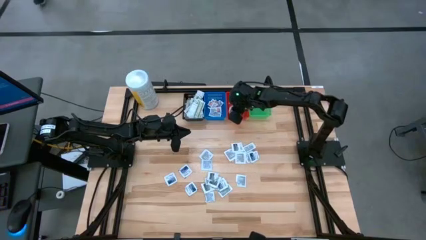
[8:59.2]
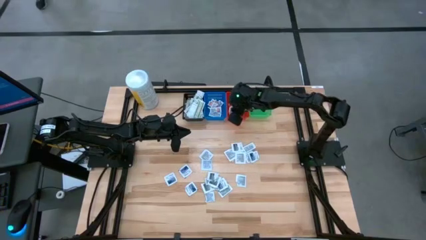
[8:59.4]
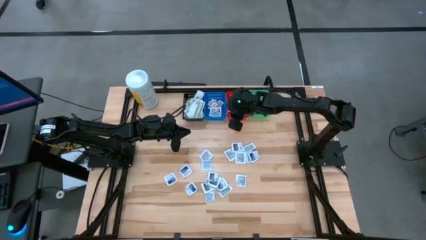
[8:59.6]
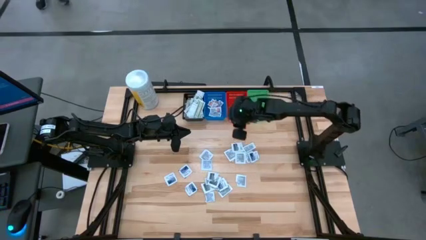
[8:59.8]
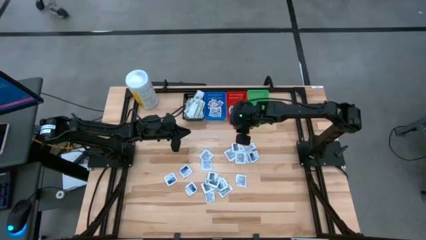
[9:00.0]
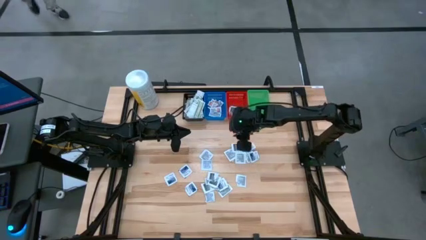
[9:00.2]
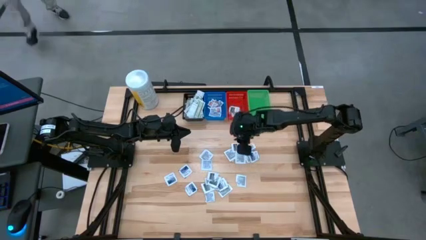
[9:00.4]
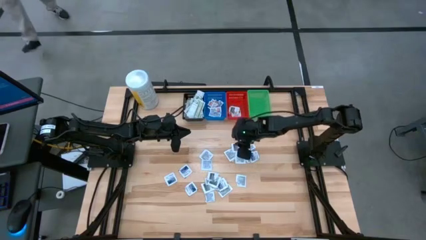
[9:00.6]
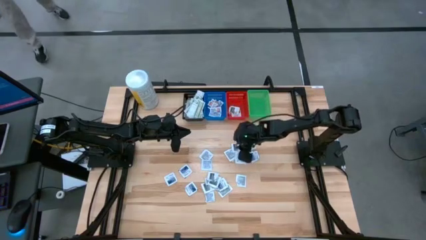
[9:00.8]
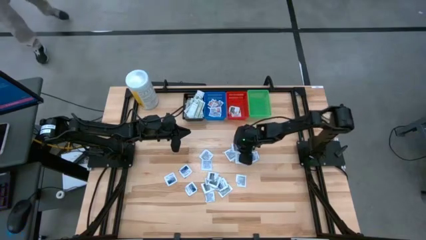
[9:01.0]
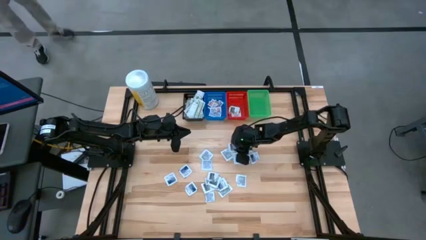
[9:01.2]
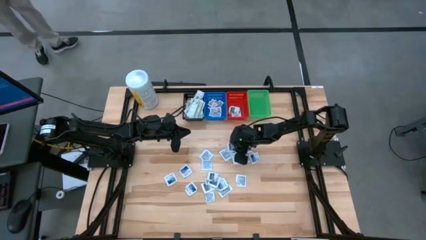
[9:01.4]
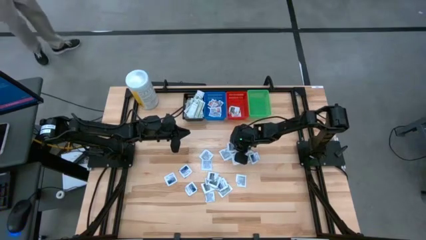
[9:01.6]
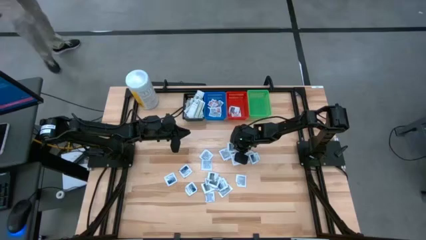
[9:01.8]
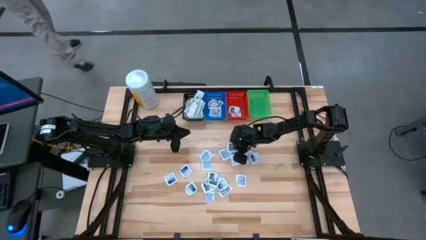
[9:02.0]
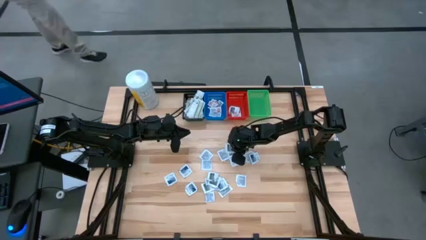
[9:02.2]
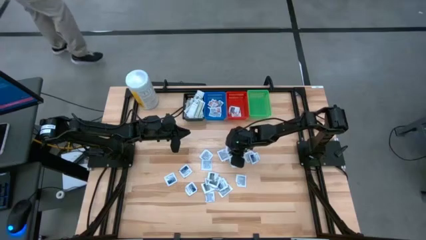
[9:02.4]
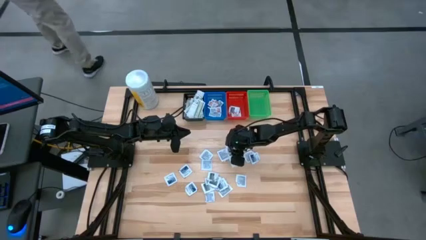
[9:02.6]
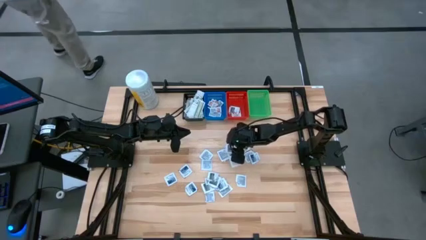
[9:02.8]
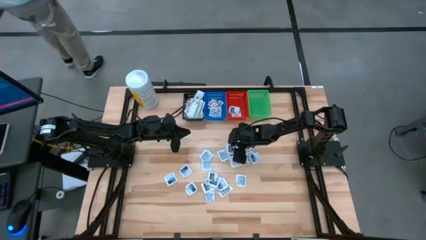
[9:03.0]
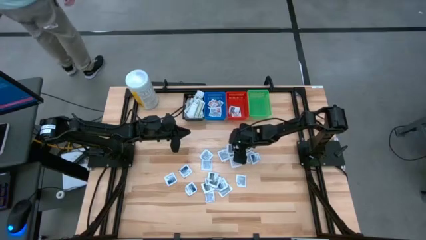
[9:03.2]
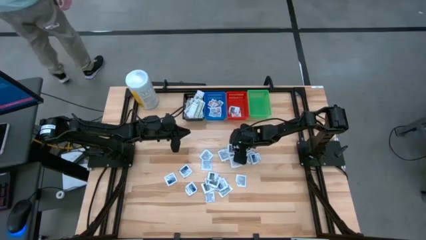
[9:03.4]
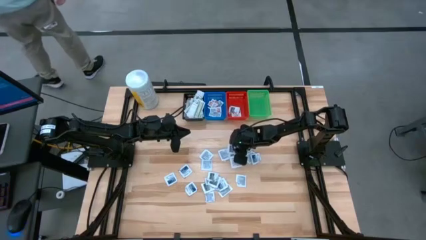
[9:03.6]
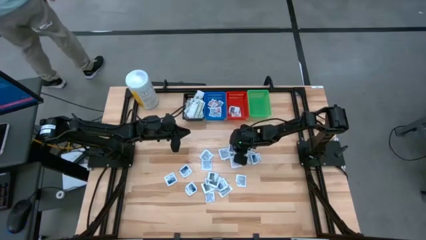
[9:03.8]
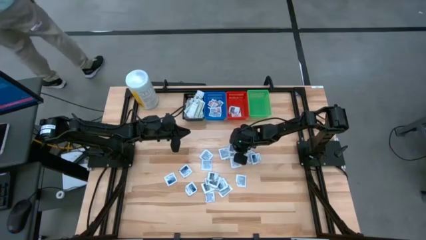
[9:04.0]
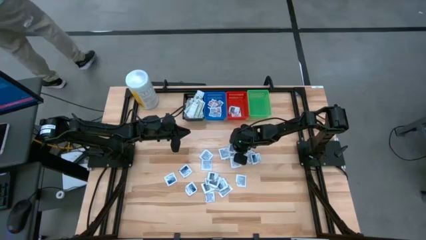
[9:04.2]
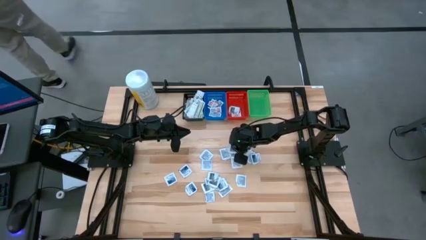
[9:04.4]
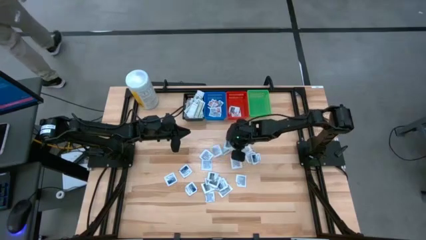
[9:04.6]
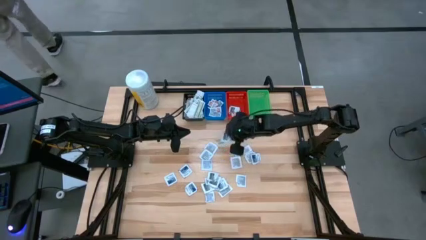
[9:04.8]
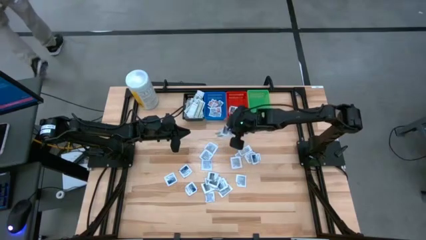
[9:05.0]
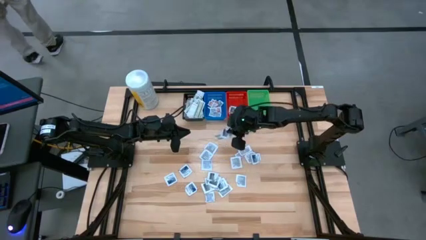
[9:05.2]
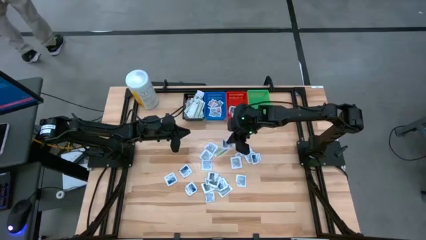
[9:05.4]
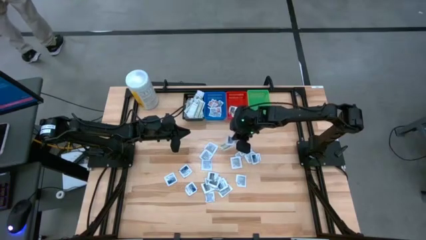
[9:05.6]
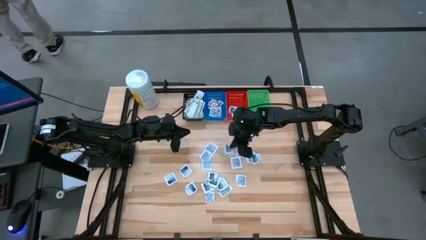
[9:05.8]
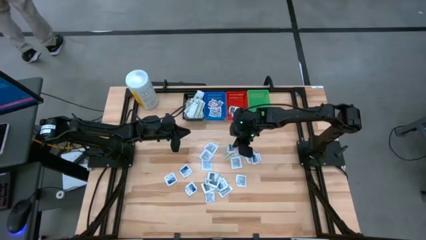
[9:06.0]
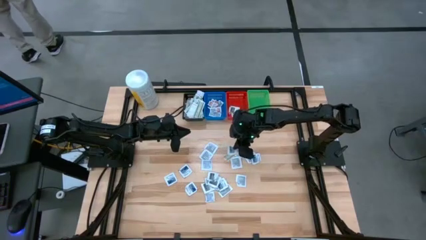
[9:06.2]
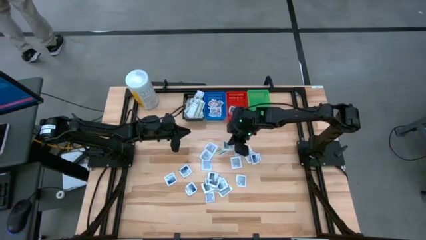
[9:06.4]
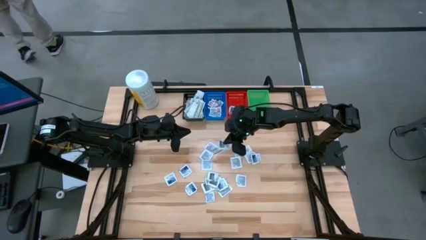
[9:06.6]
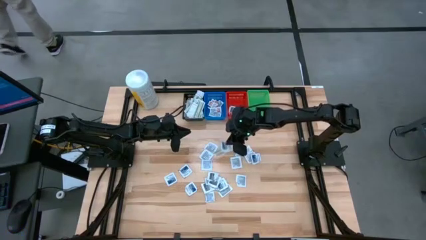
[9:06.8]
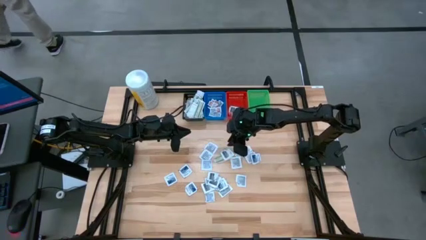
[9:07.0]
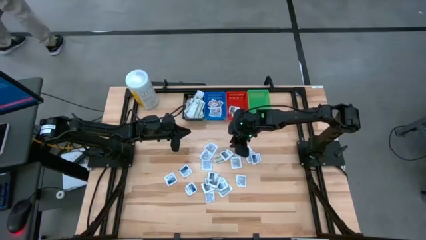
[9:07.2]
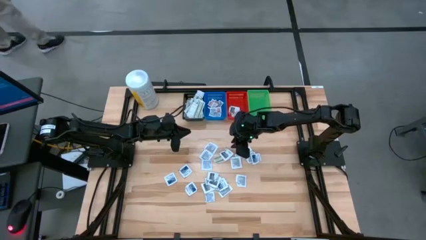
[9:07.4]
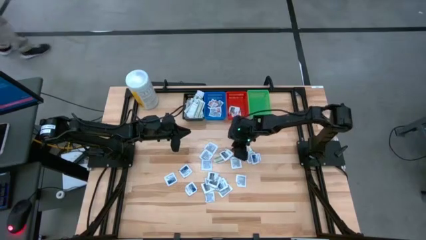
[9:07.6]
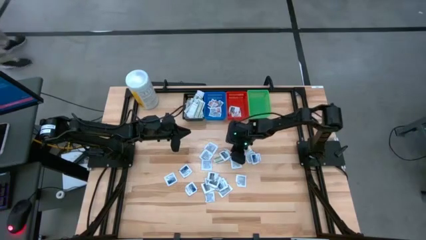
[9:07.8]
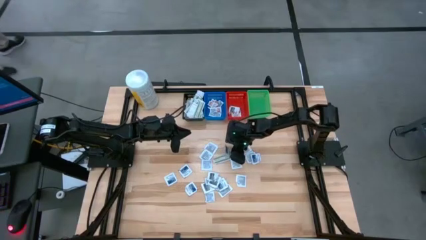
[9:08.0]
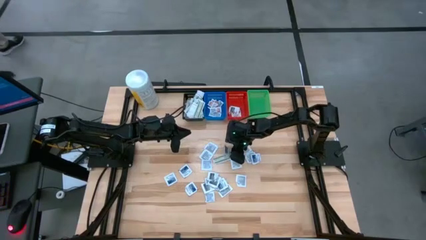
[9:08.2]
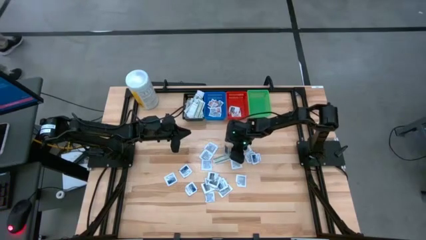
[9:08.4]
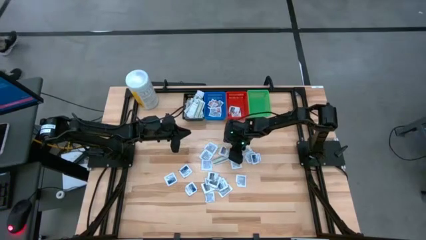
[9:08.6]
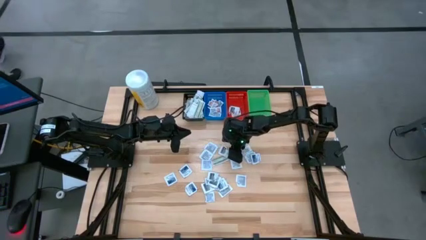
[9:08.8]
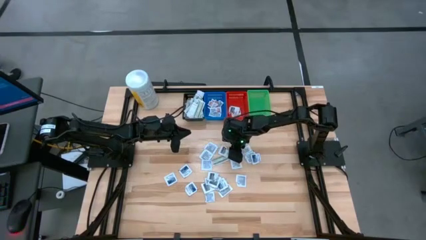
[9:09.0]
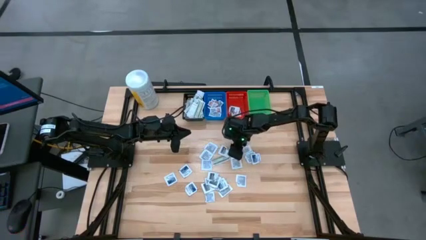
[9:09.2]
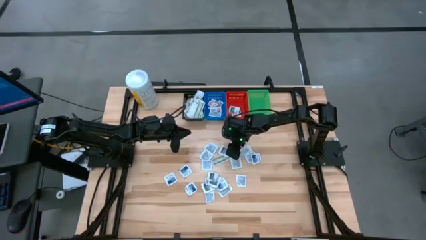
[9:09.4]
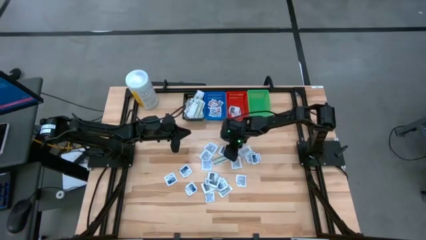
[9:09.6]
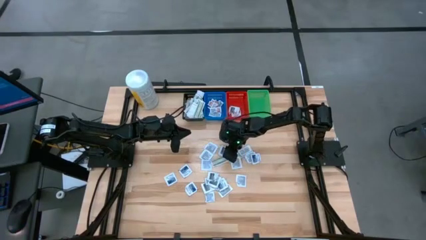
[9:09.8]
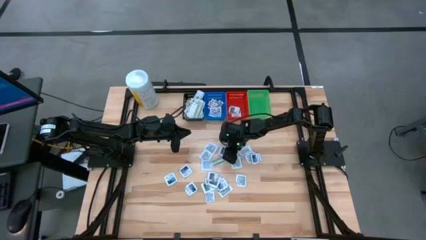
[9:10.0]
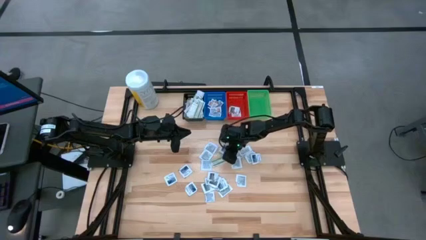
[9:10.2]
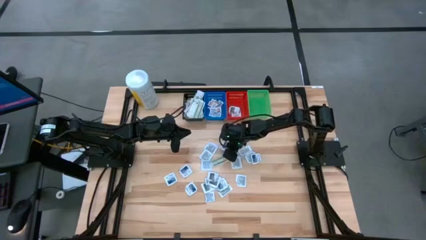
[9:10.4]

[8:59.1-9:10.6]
Task: Pick & Place First Aid Supplies
Put the gray towelette pack in the red bin

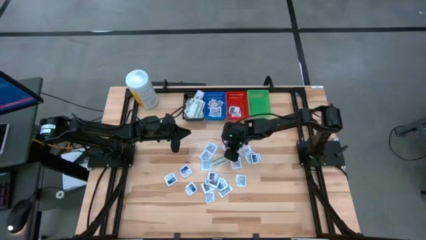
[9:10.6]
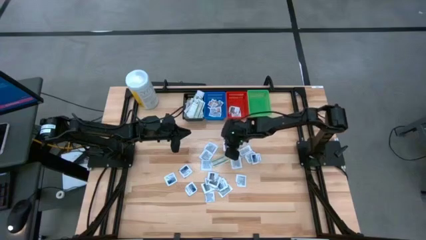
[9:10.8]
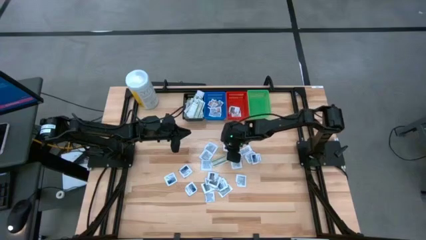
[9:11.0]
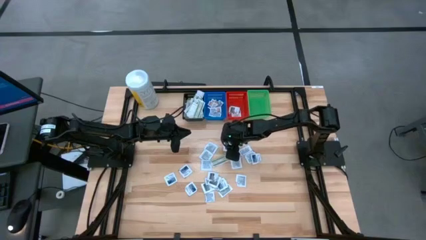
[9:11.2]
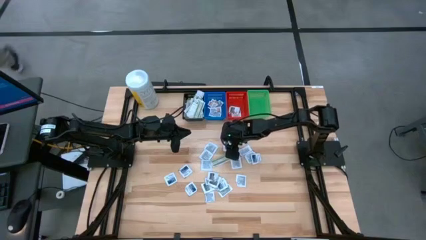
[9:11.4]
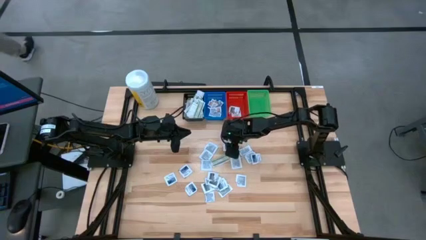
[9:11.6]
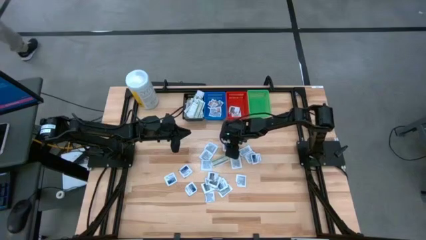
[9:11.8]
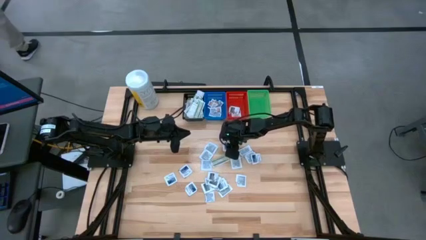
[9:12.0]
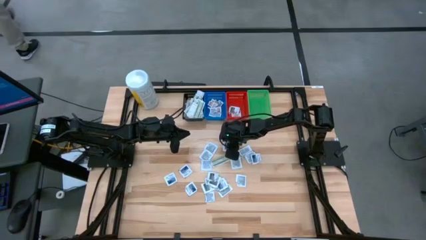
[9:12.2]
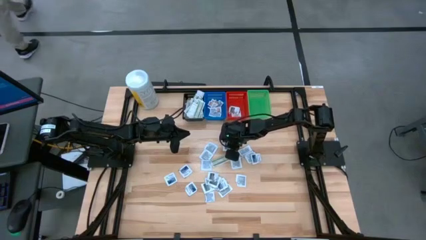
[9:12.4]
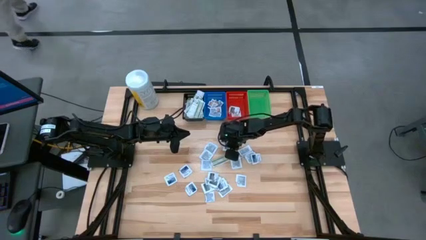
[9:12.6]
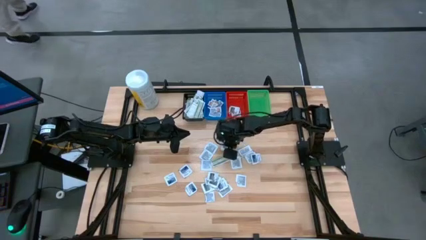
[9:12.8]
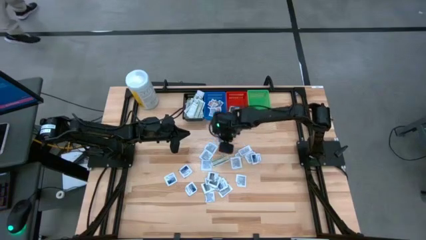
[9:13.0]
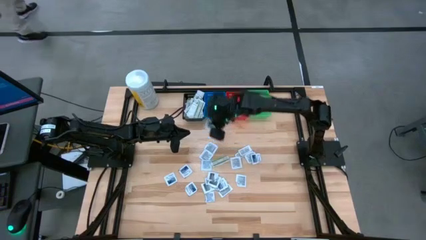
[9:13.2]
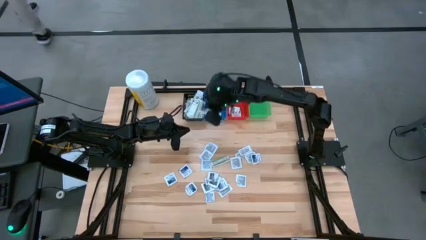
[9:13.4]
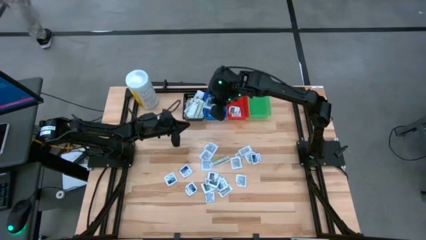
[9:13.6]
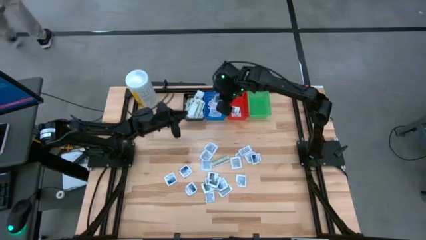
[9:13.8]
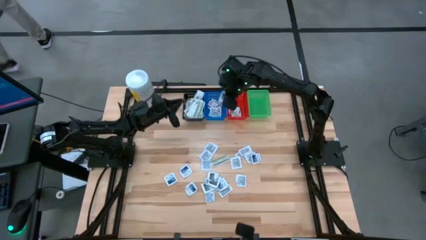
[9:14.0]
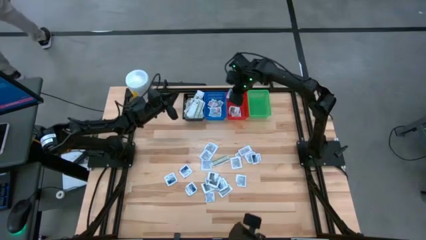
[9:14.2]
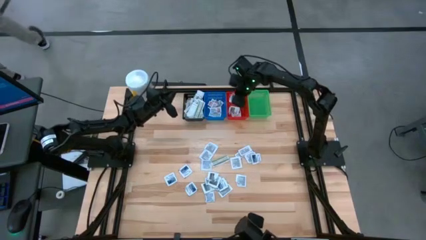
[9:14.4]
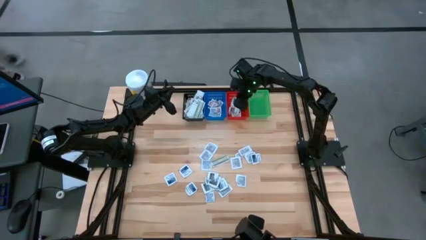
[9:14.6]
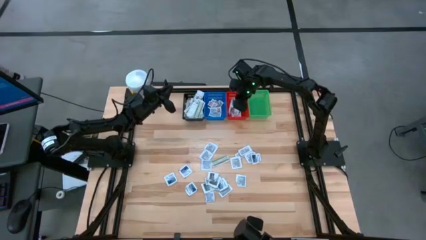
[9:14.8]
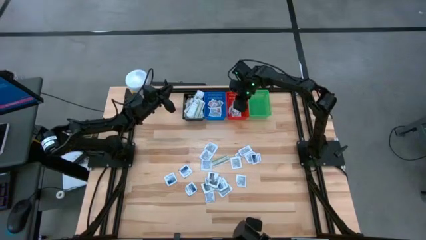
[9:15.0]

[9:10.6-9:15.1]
Put the gray towelette pack in the red bin
